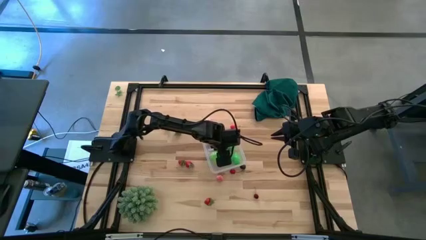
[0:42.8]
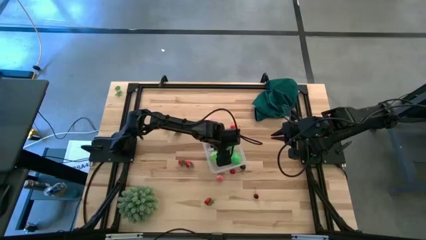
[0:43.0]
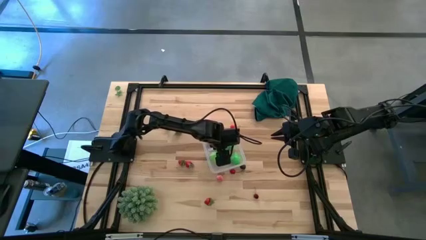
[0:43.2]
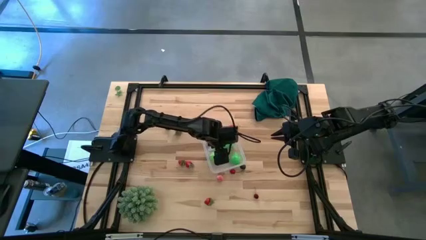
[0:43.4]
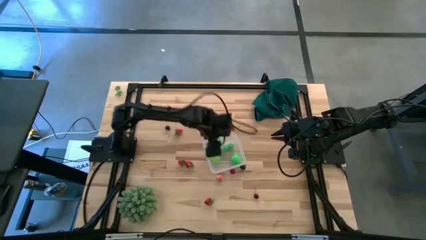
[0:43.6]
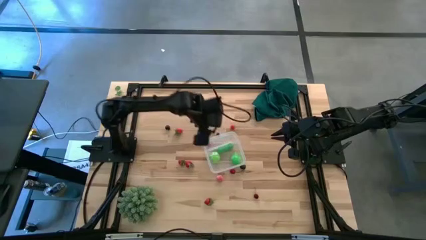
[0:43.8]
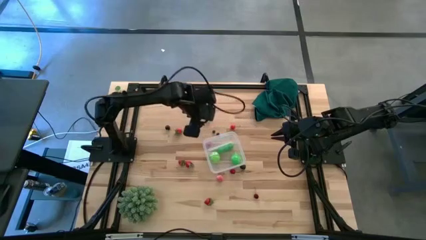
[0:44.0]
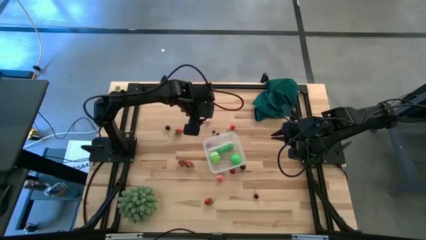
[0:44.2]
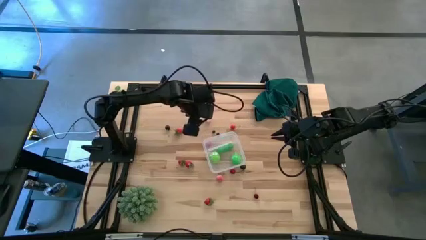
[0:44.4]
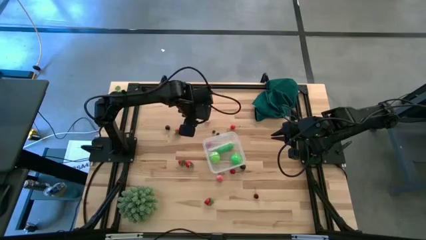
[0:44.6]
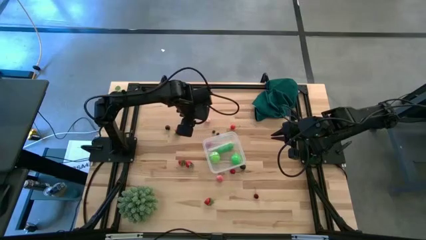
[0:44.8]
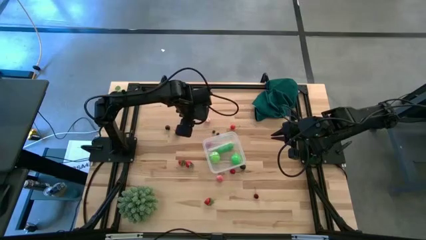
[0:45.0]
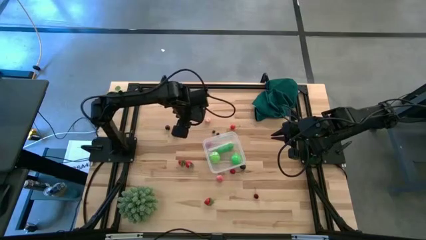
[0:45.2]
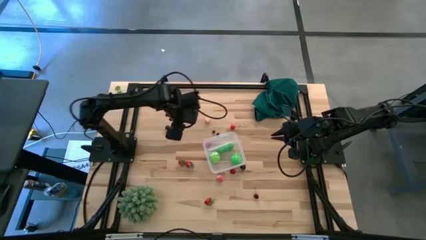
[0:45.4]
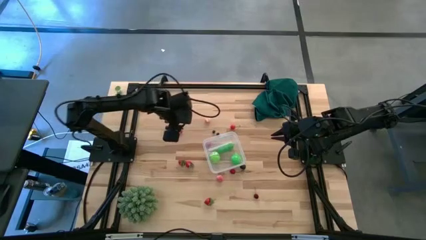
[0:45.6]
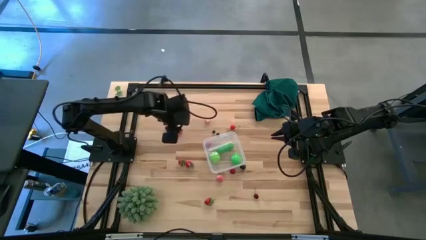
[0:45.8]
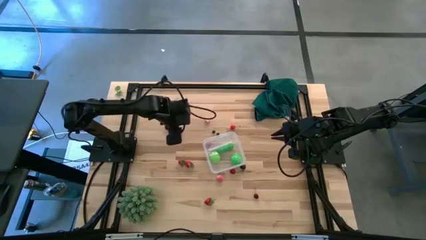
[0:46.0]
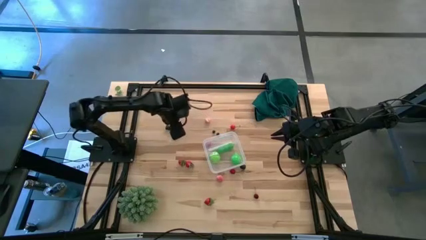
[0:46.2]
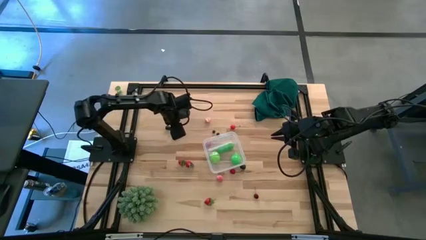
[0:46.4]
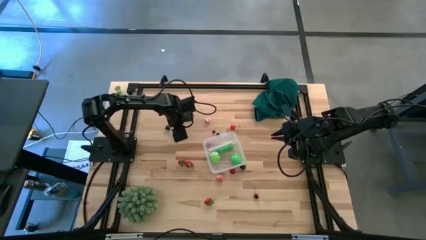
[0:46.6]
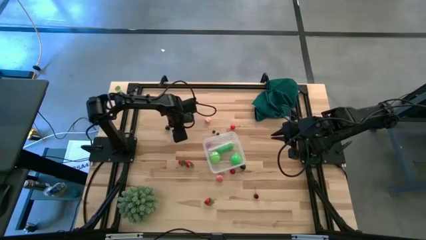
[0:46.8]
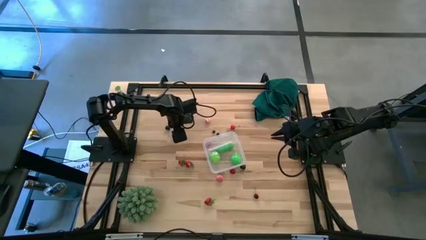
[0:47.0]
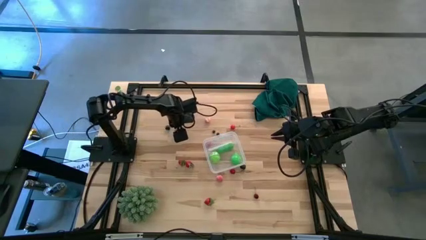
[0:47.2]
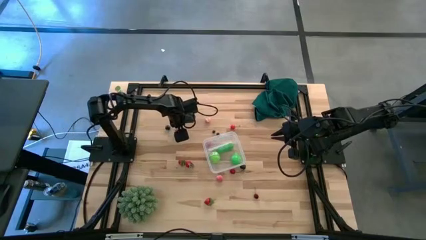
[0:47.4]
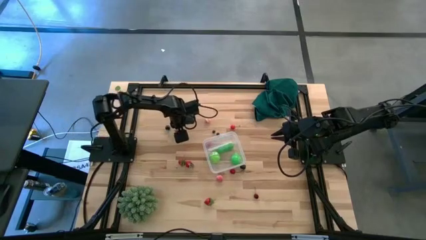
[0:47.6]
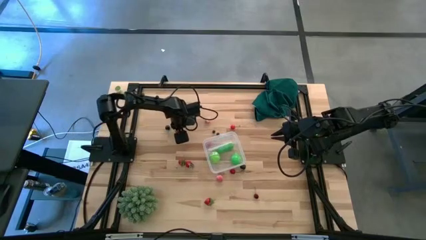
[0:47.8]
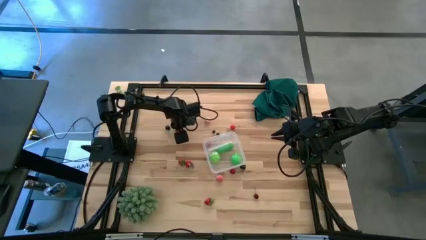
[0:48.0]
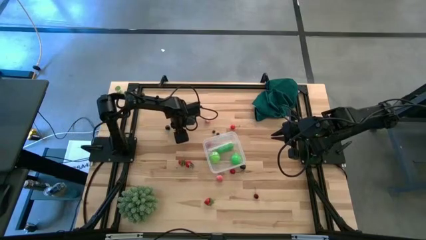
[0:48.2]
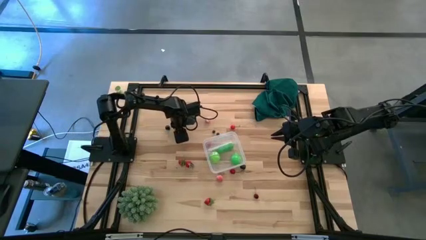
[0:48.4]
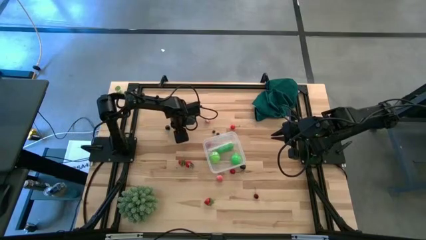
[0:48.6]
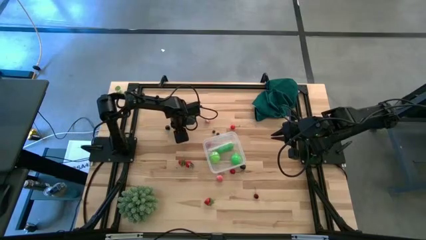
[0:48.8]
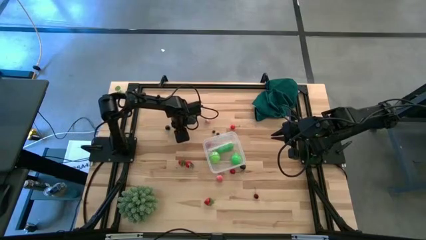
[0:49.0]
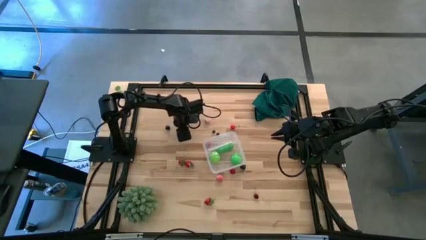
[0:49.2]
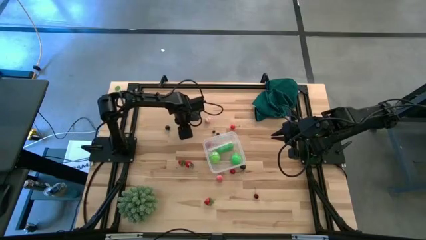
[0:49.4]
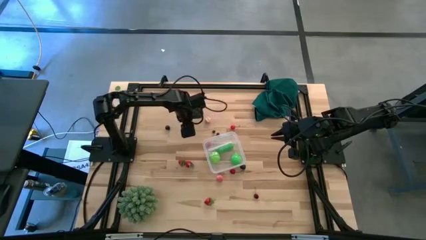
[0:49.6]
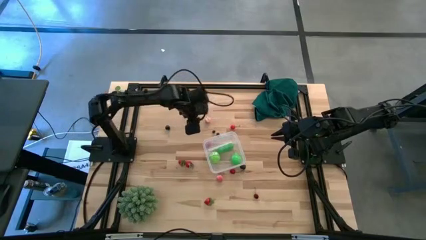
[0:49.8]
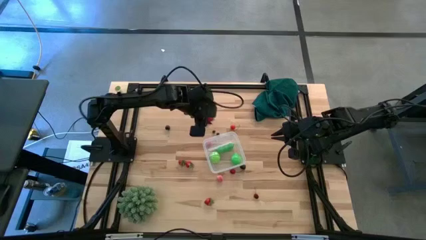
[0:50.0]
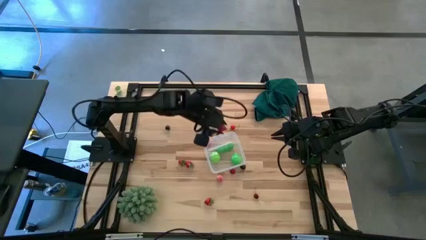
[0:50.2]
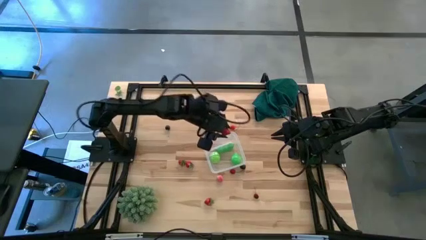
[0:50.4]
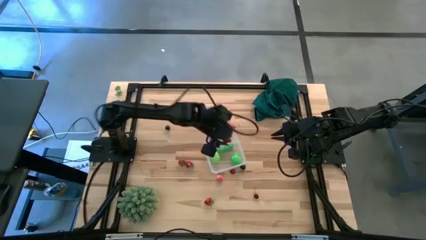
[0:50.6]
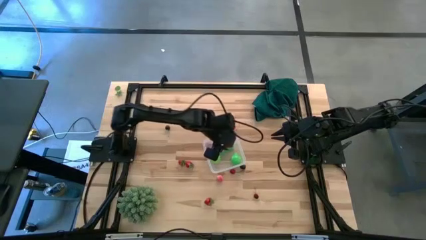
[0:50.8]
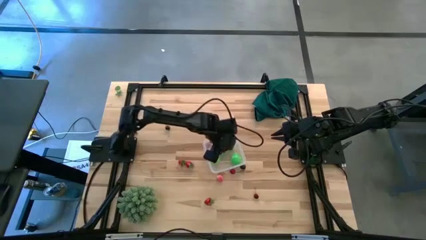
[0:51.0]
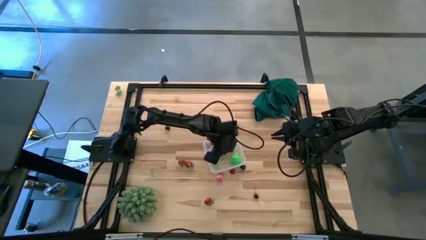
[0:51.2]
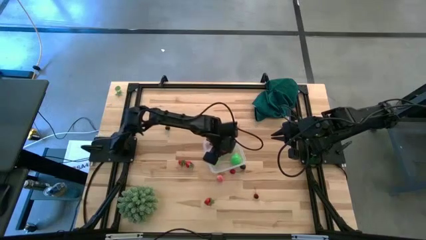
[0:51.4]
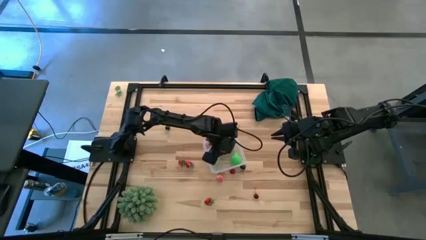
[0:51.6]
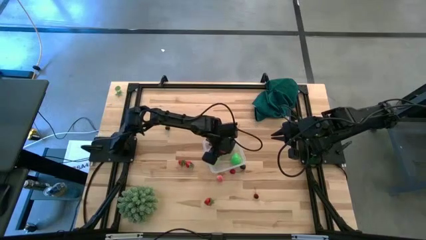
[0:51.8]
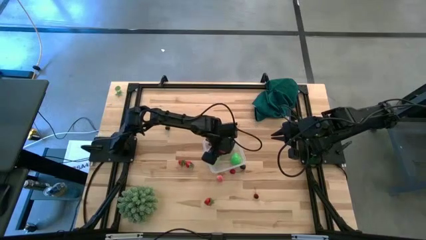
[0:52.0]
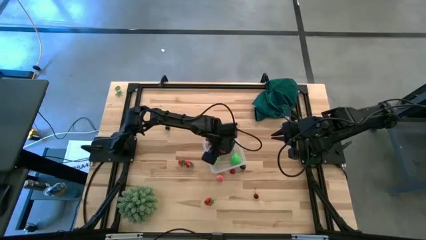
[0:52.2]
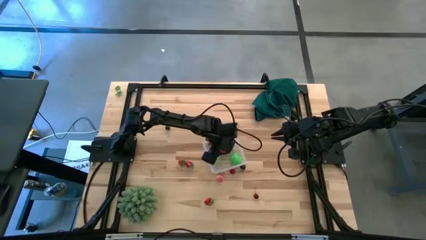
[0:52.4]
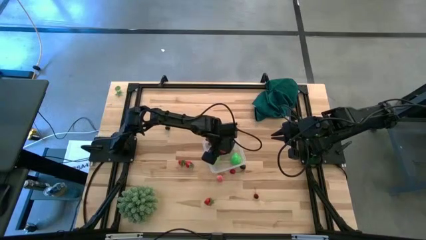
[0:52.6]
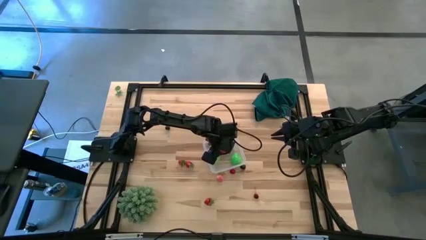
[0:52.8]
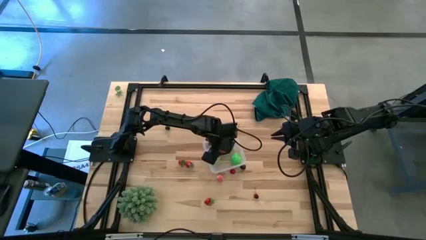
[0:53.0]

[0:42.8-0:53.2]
Task: Pick and placing Produce into tupperware
Put the red strawberry into the transparent container

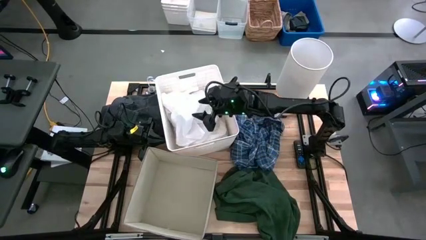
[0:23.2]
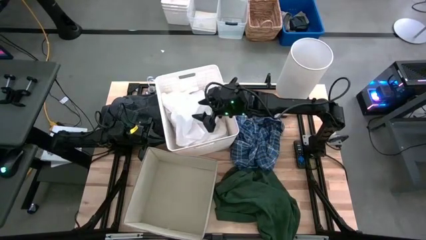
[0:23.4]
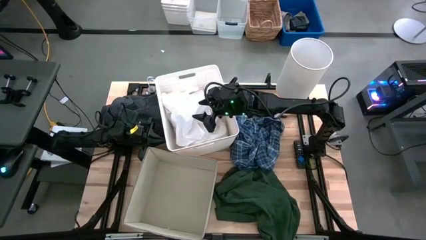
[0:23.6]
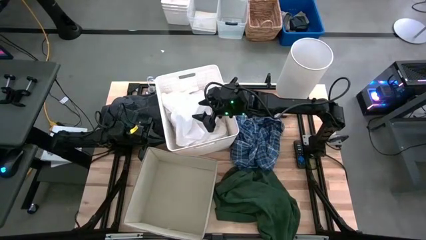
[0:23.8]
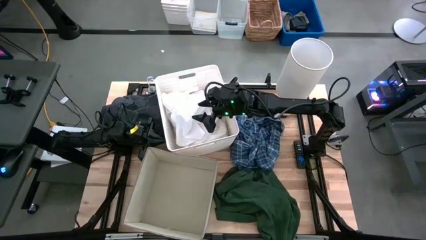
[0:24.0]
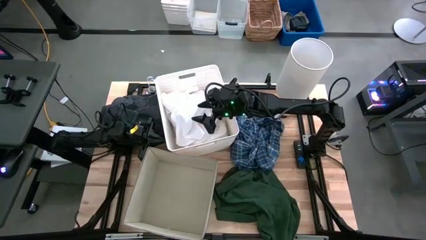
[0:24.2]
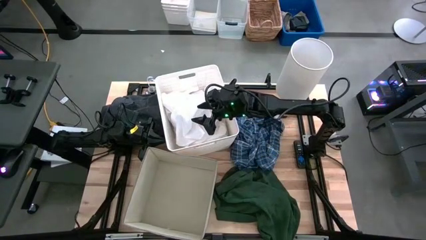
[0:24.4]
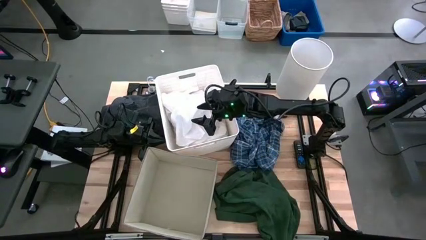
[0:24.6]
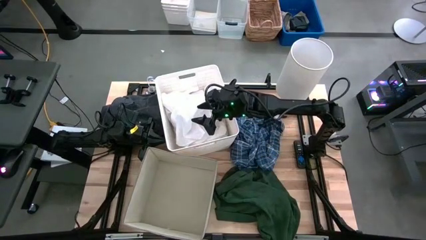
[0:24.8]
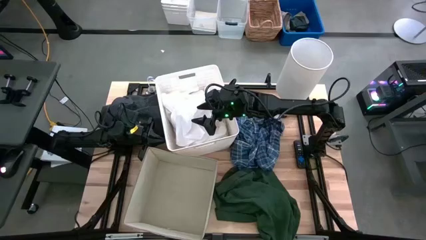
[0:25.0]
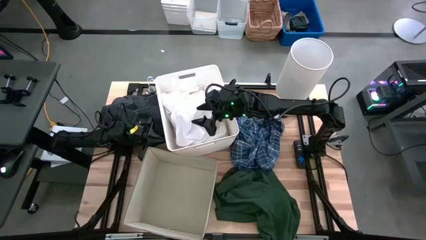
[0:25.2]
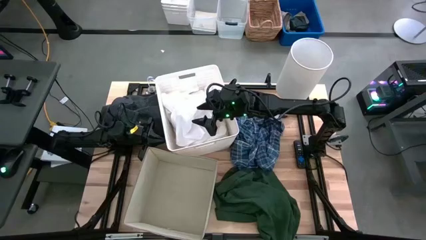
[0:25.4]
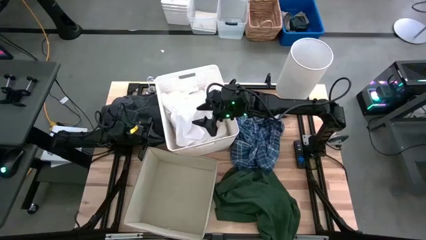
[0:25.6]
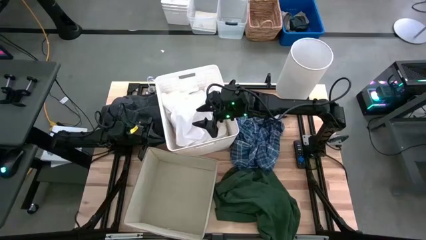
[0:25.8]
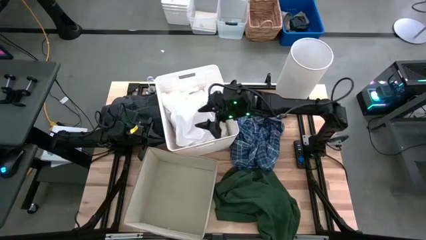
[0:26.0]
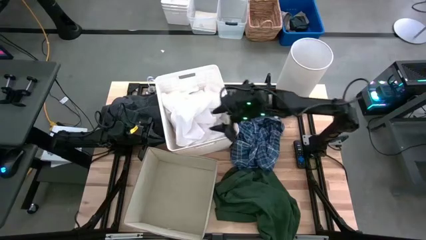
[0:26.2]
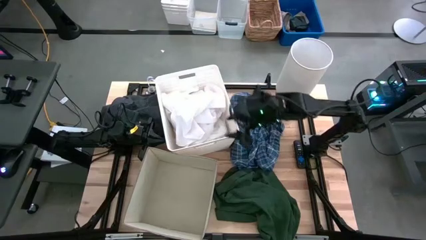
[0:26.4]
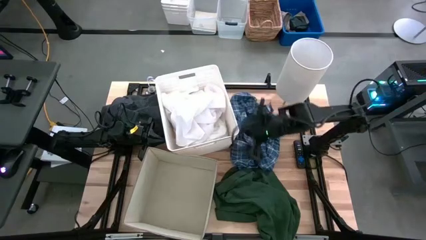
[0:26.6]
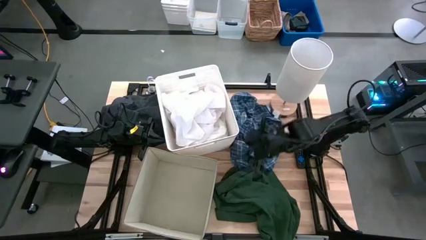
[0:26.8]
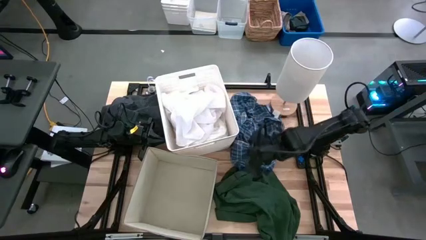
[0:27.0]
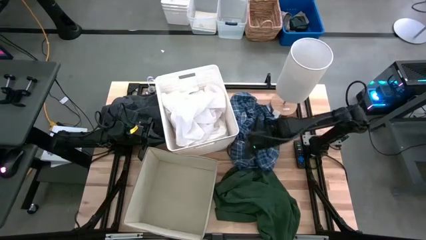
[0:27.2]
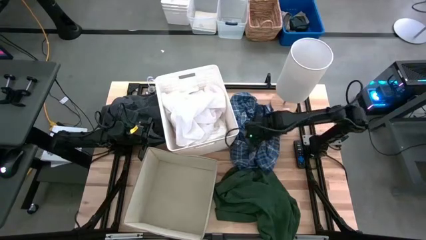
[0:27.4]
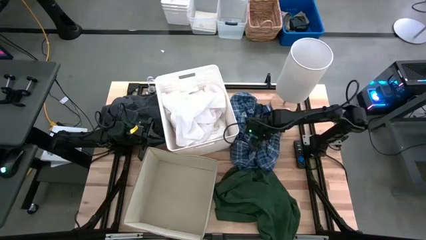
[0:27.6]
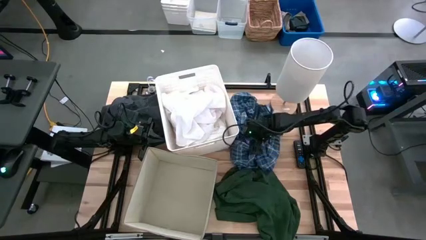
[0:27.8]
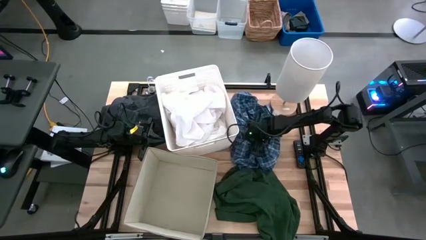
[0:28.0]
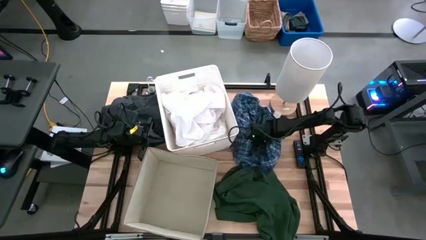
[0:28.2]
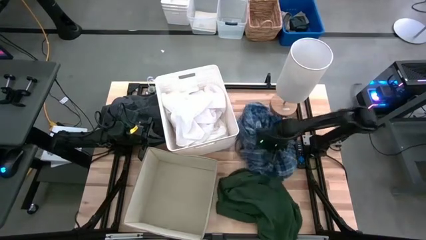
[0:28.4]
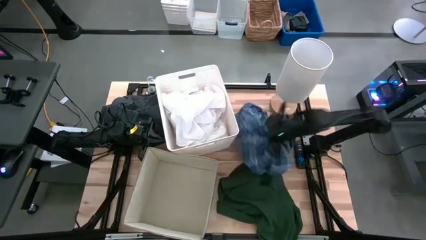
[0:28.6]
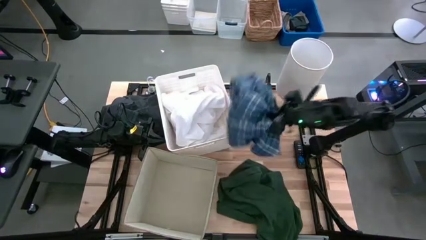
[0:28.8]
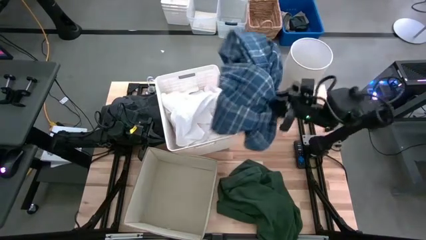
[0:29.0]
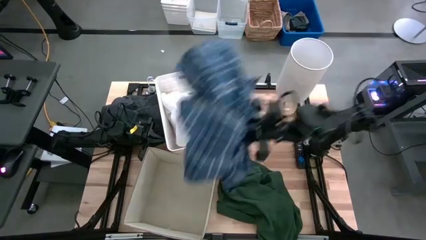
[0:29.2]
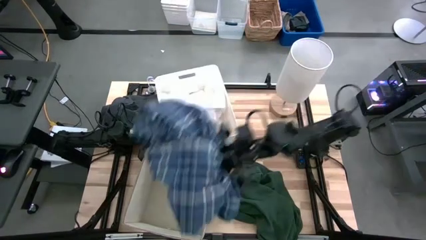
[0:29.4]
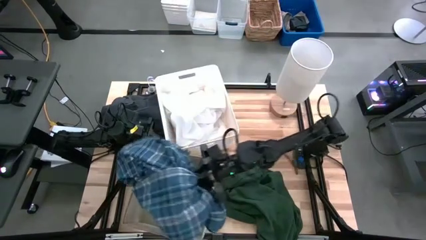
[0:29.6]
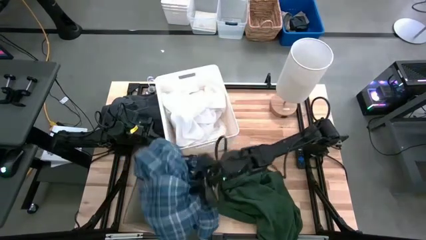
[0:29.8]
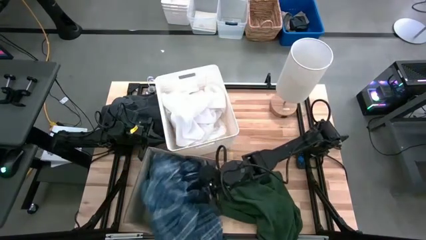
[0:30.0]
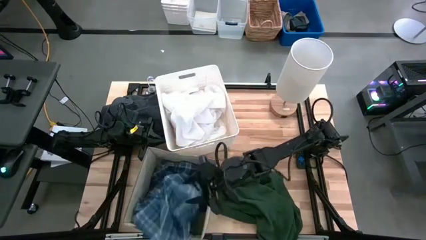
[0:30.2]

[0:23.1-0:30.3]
Task: Sort clothes
Put the blue checkered shirt into the laundry organizer
